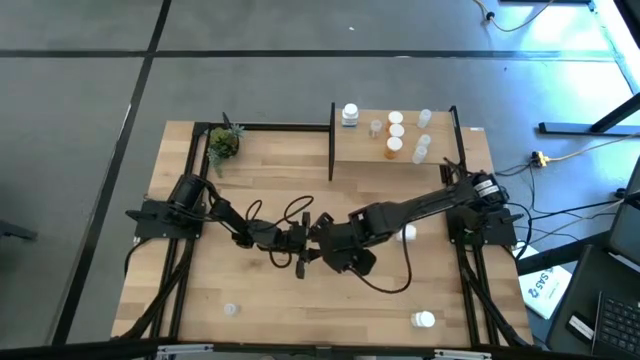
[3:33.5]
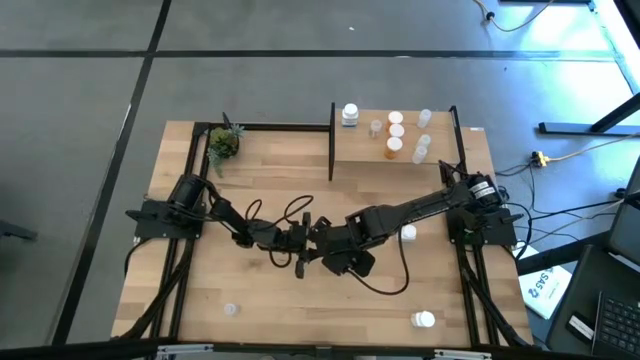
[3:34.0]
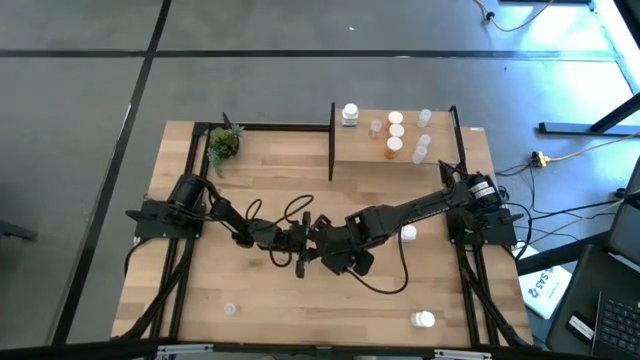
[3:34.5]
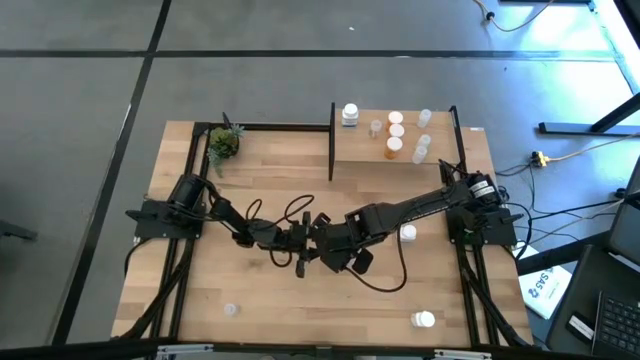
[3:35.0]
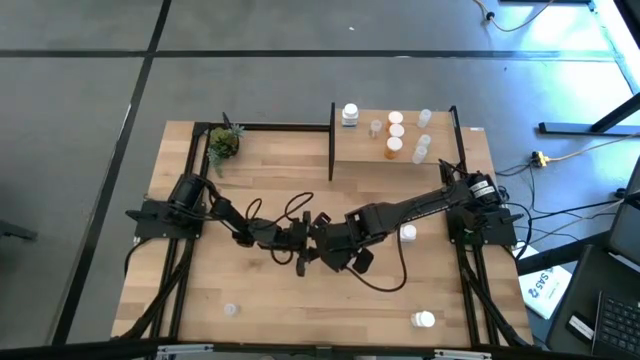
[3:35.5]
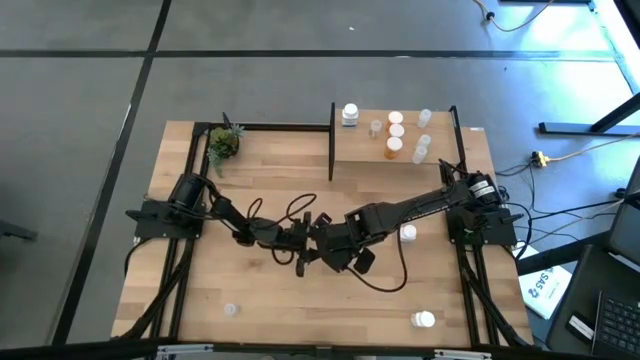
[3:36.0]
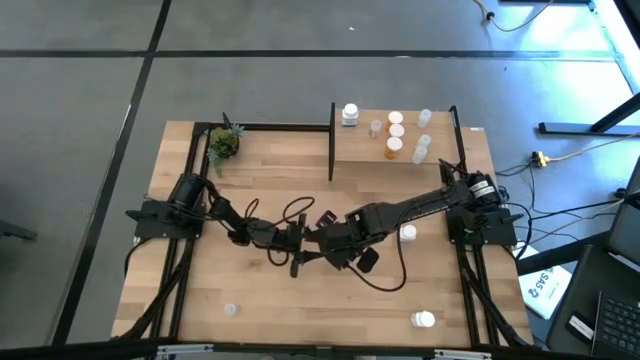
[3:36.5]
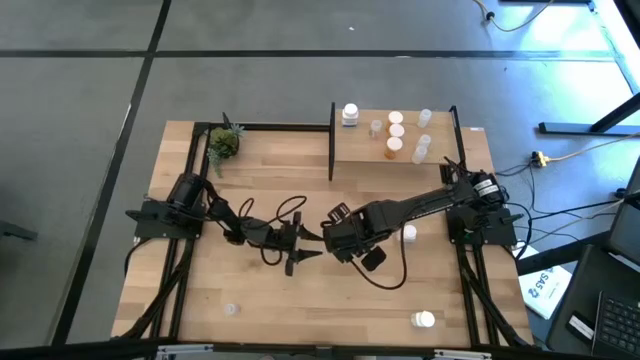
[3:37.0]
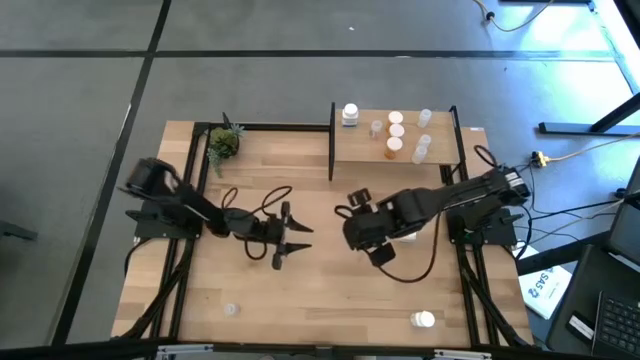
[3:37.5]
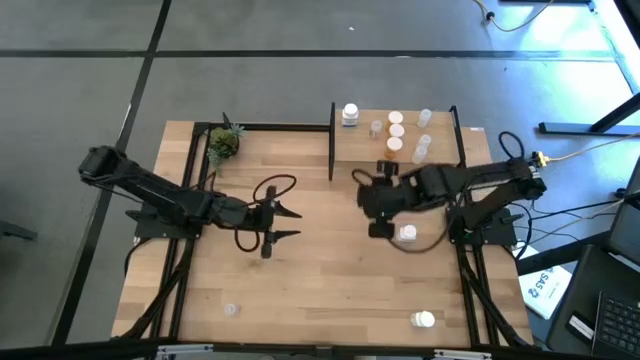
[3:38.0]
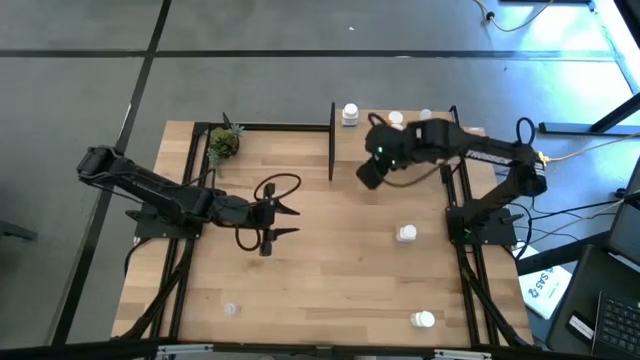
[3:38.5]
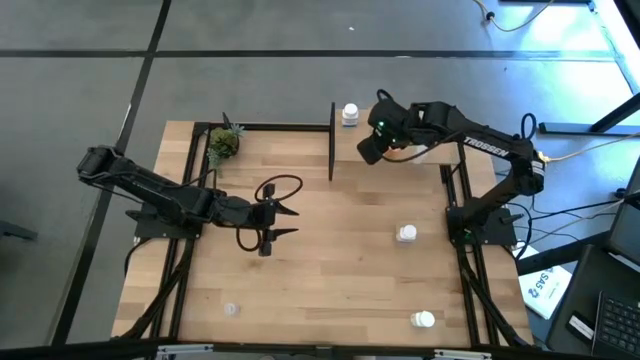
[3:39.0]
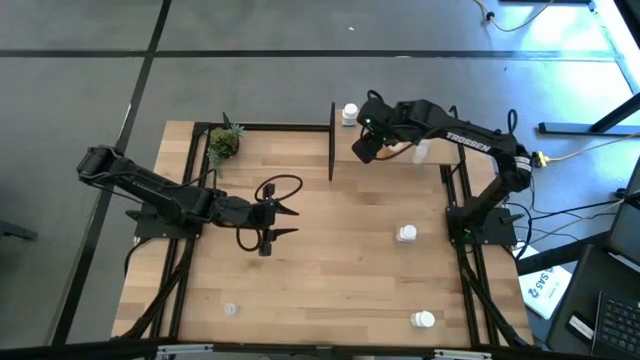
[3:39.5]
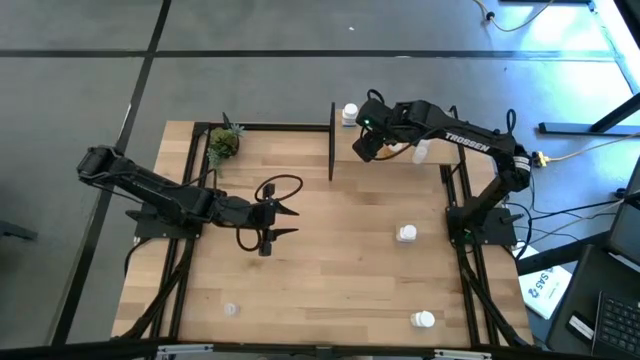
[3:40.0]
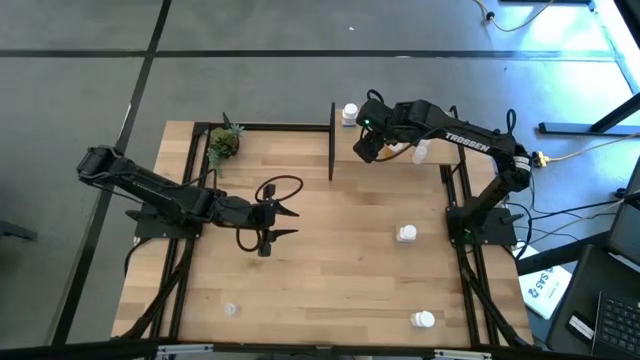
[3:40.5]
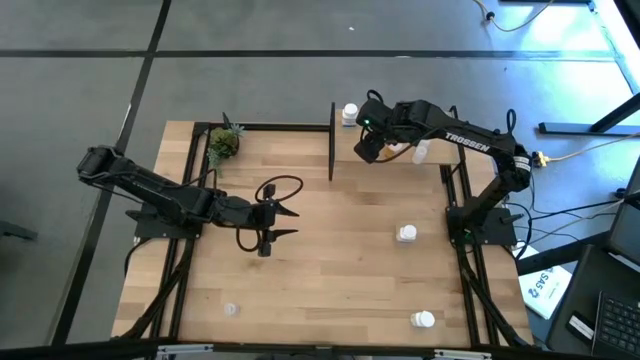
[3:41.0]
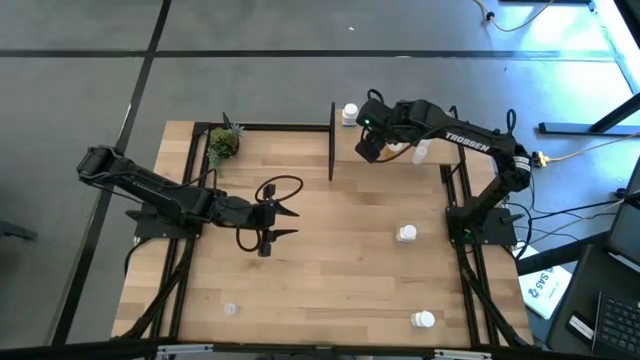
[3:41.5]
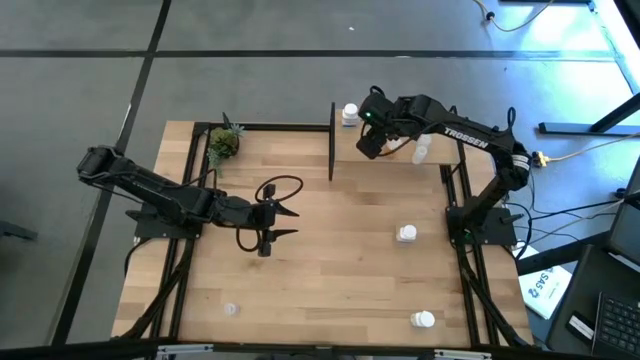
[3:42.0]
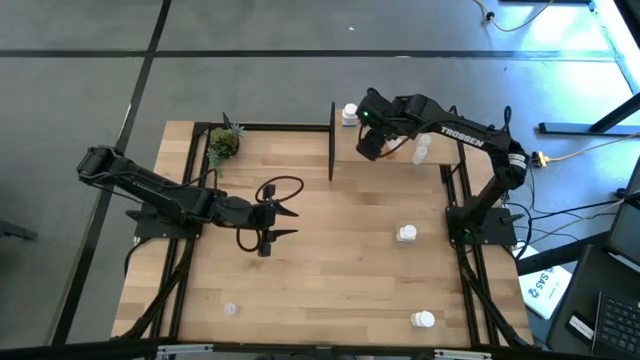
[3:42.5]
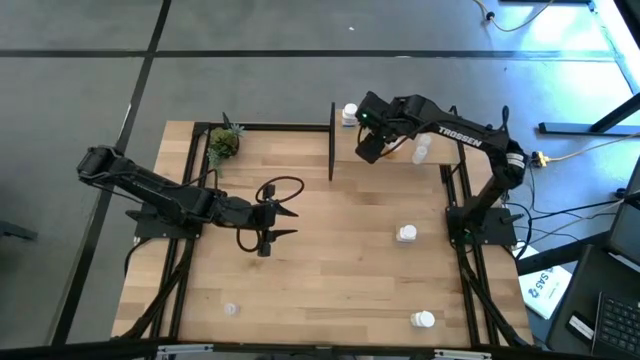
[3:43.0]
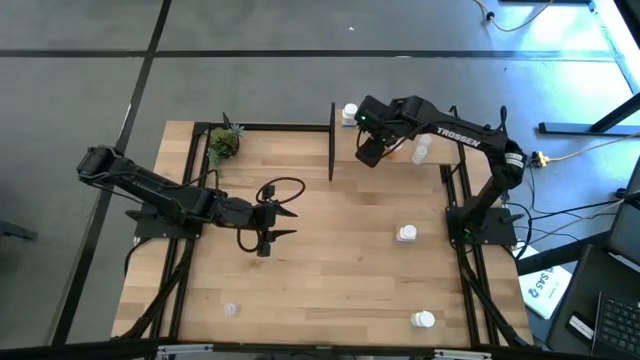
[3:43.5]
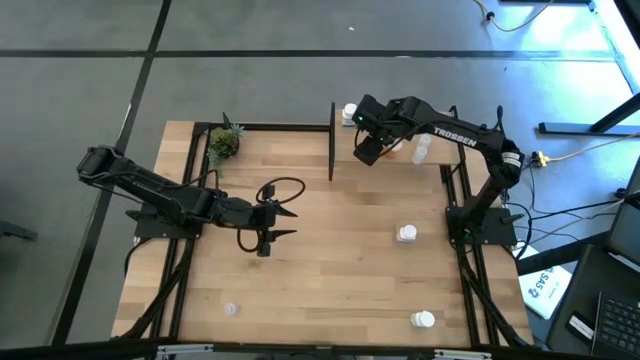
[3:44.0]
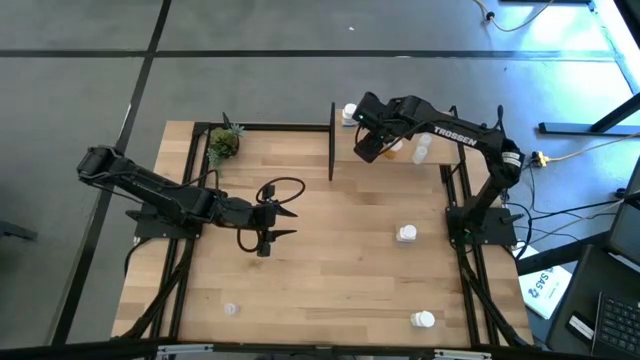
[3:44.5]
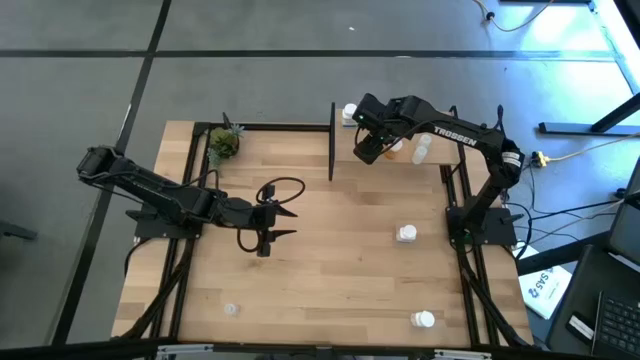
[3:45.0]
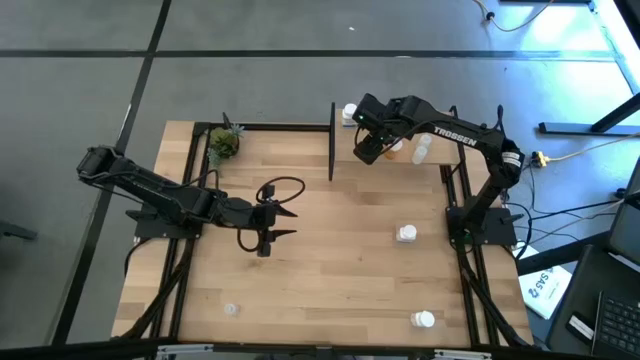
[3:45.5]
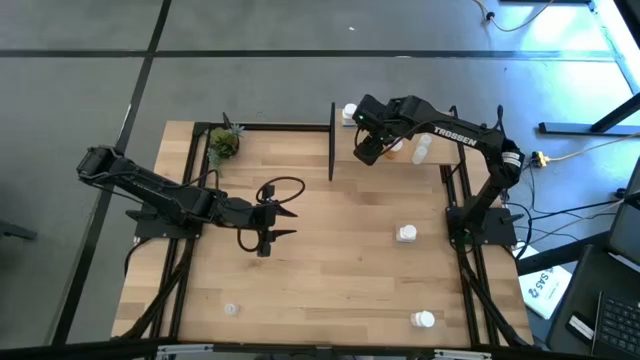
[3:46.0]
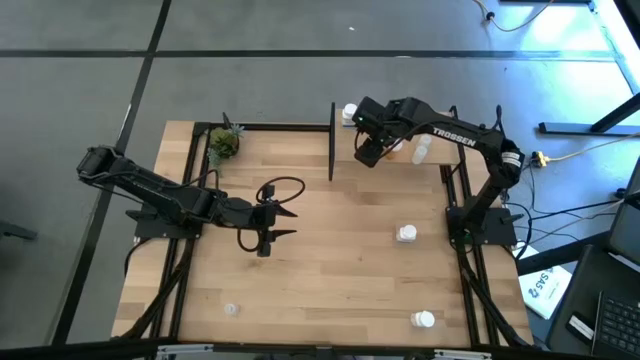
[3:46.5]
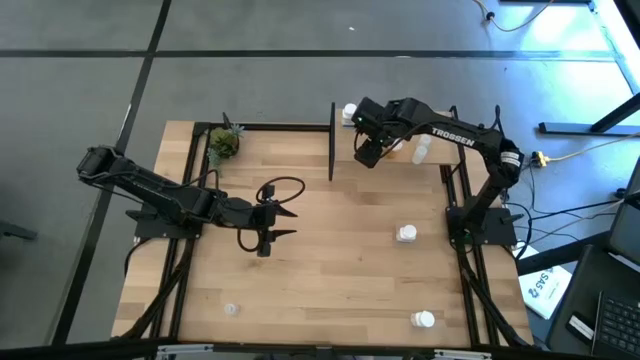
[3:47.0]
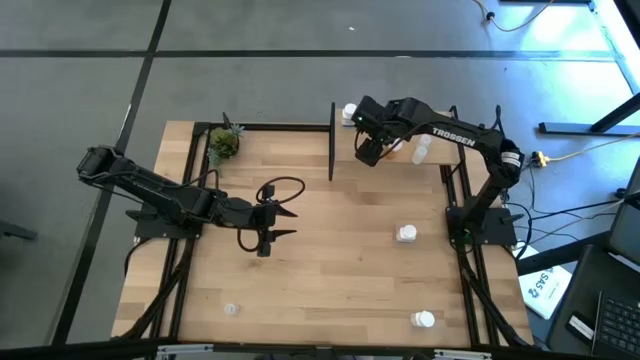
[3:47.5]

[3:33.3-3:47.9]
Task: Pick and place medicine bottles onto shelf by color
Put the top green transparent pill bottle on the shelf aligned with the other green transparent pill bottle

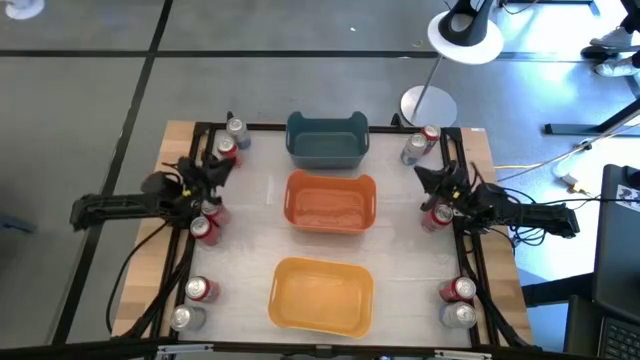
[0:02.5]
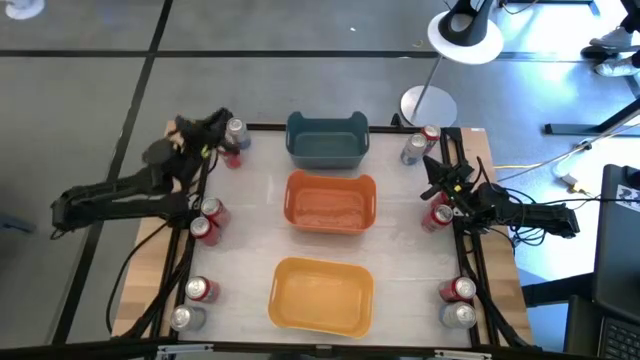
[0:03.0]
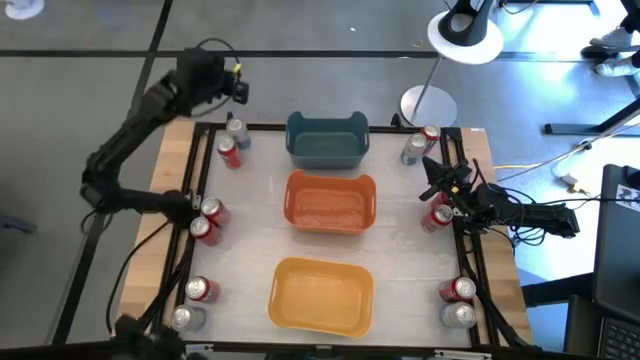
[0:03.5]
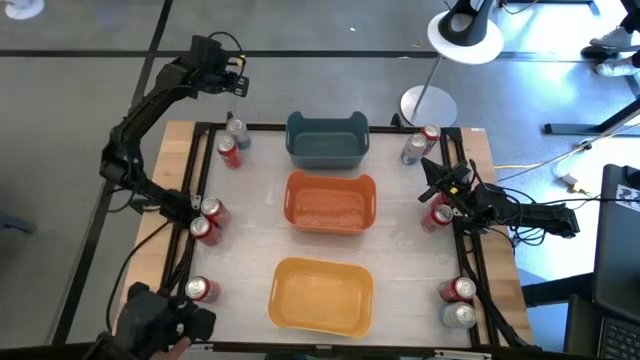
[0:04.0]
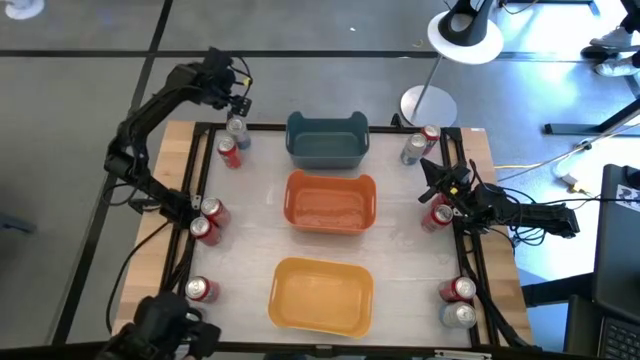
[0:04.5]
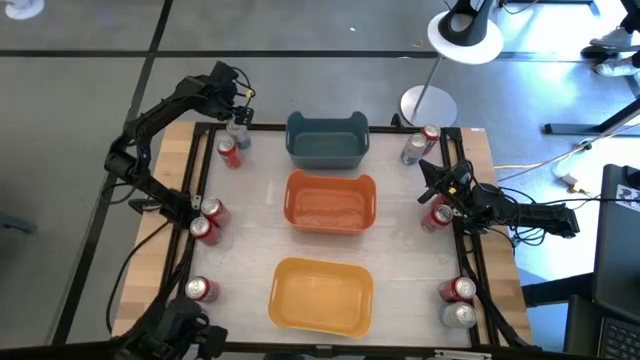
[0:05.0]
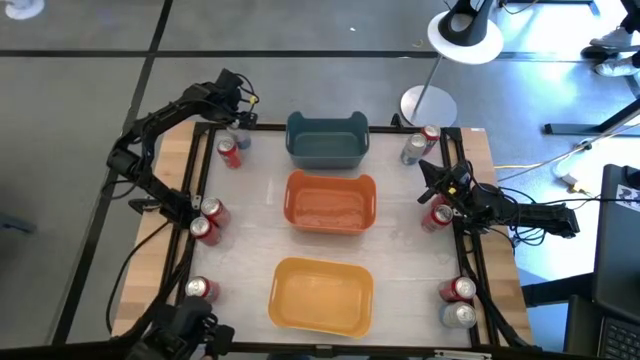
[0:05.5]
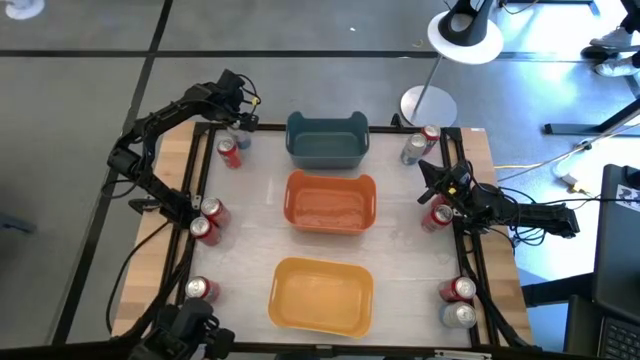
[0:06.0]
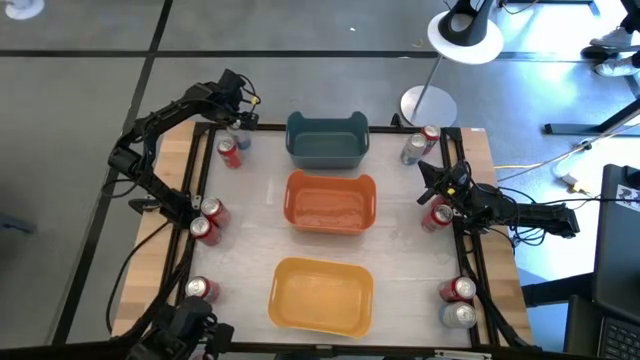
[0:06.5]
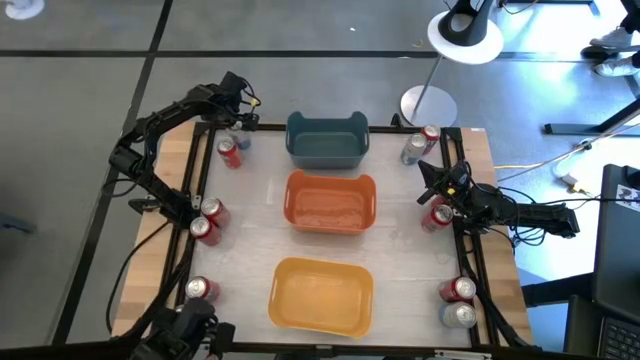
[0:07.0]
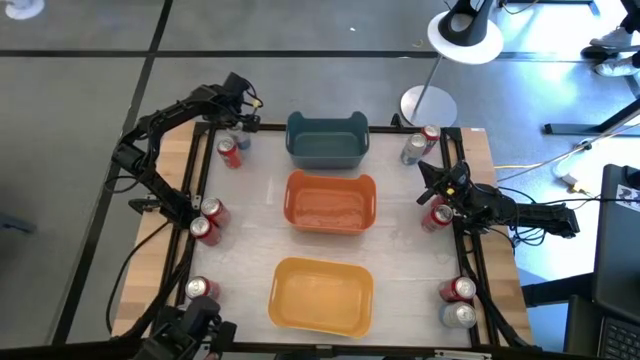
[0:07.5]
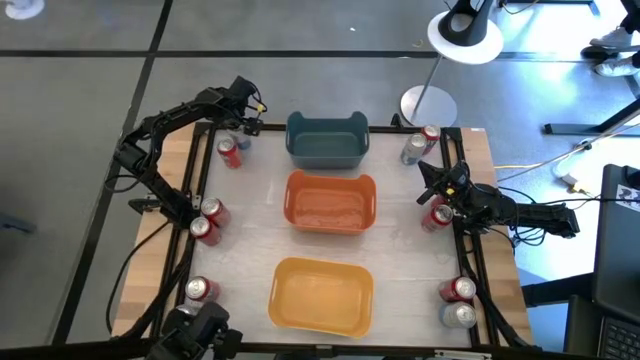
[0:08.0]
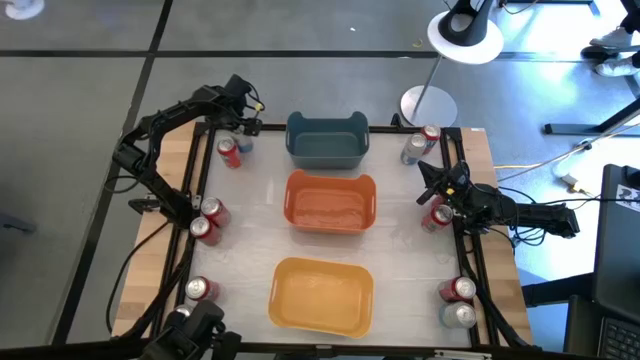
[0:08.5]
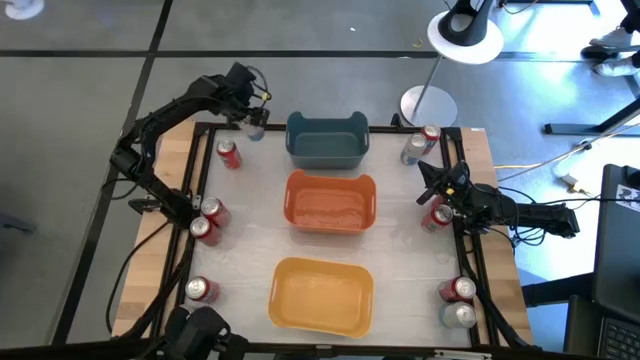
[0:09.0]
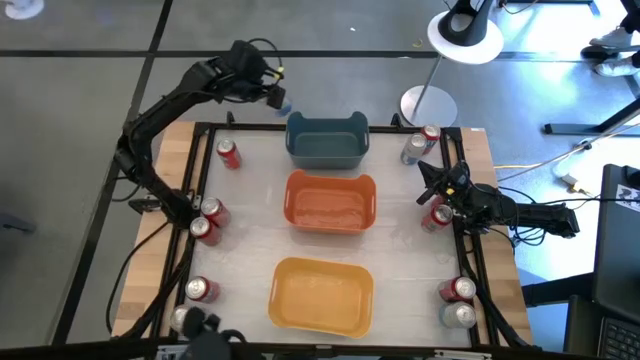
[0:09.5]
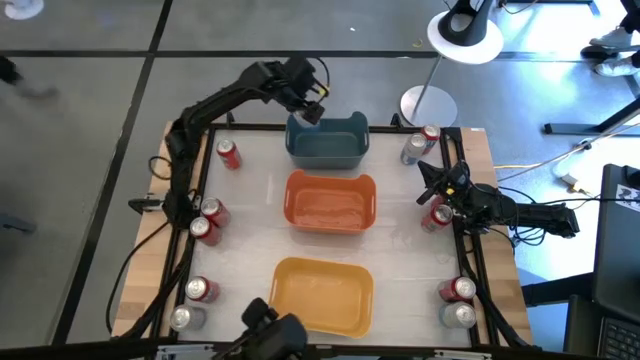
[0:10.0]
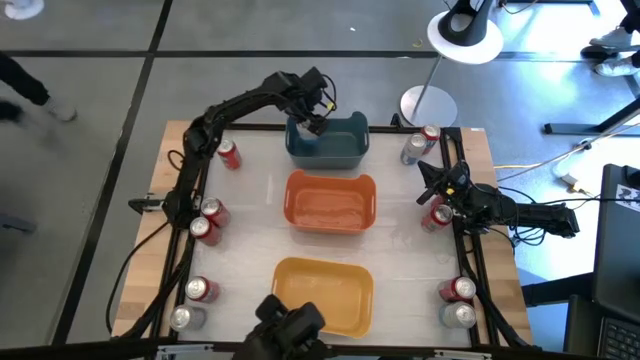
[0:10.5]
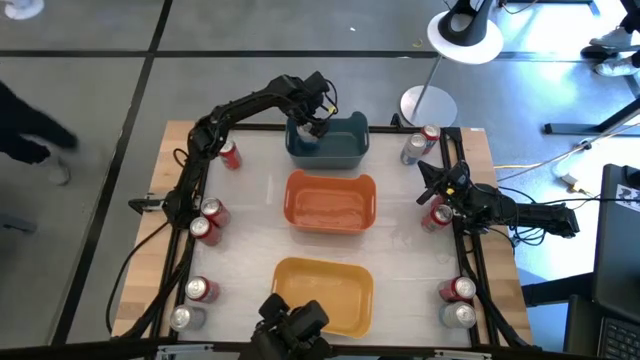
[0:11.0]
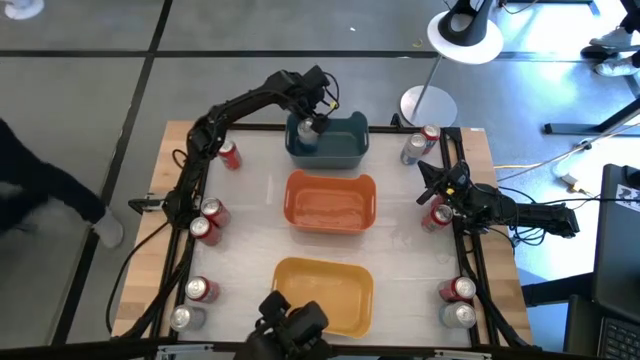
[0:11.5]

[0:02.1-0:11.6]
Task: Sort soda cans
Put the top left blue soda can into the dark blue bin
